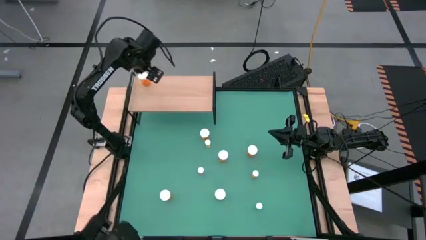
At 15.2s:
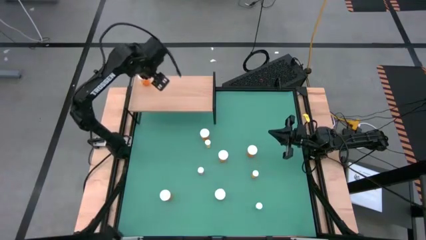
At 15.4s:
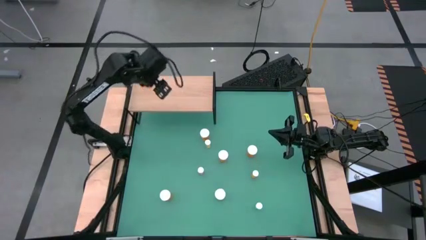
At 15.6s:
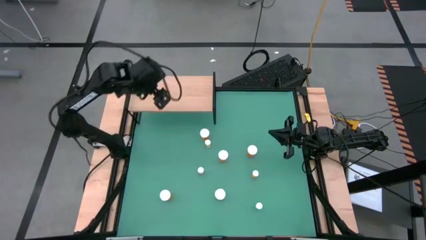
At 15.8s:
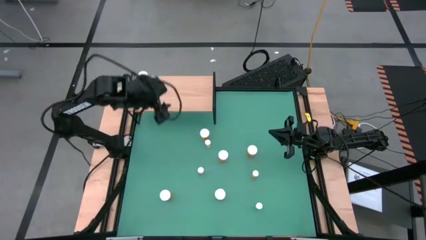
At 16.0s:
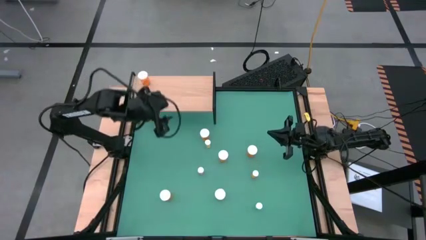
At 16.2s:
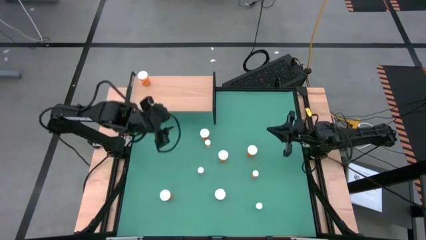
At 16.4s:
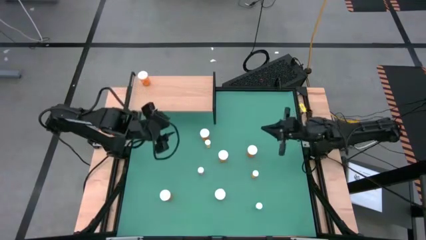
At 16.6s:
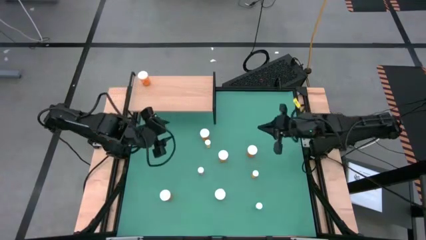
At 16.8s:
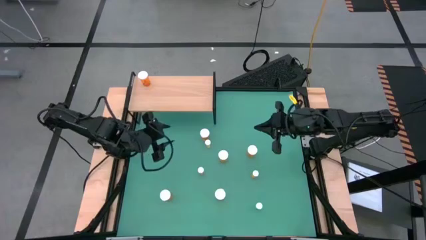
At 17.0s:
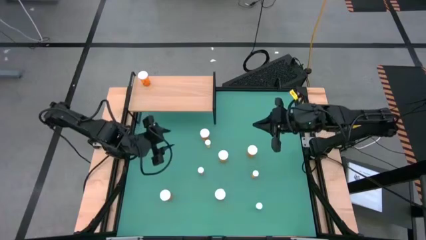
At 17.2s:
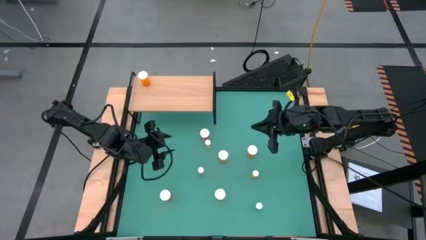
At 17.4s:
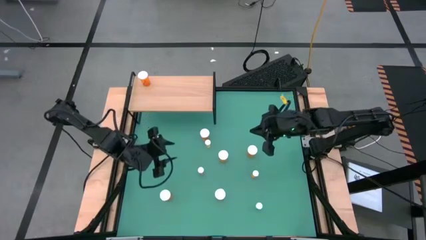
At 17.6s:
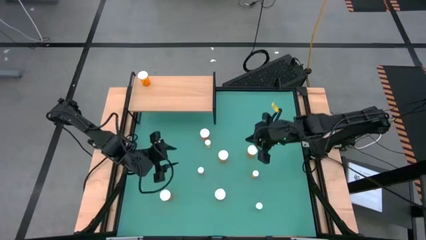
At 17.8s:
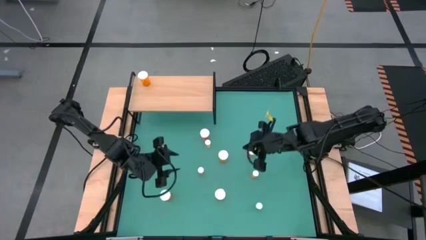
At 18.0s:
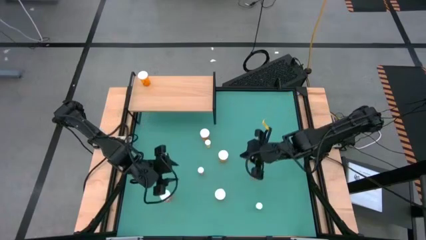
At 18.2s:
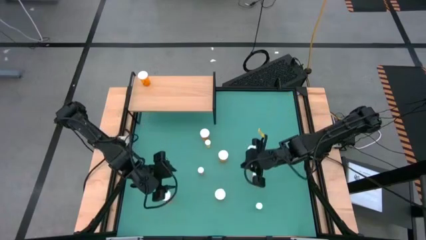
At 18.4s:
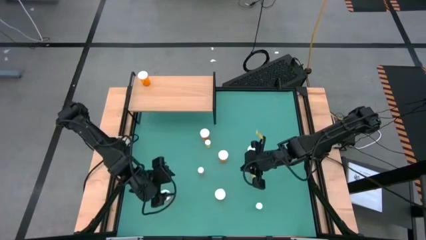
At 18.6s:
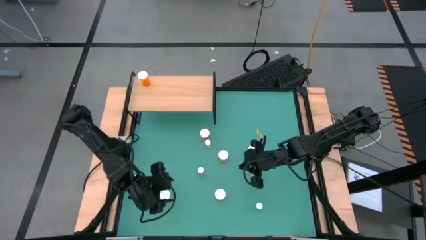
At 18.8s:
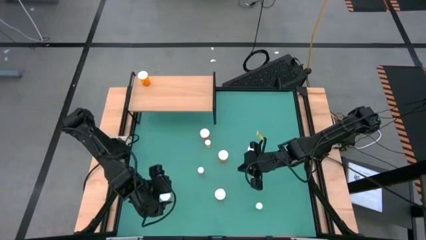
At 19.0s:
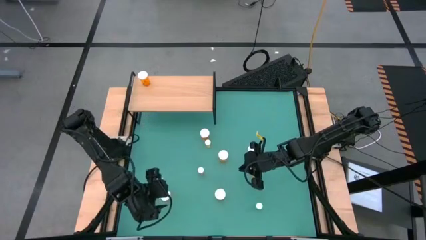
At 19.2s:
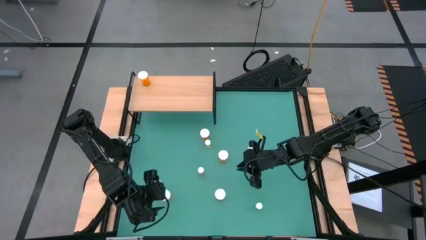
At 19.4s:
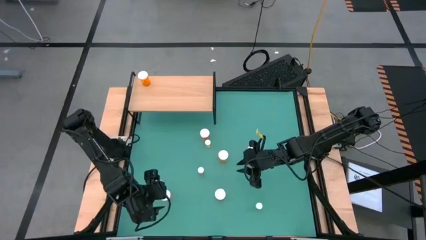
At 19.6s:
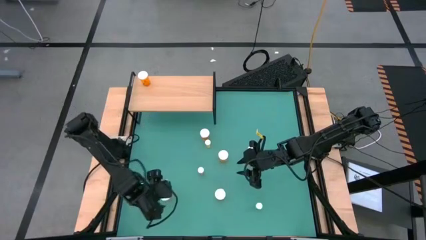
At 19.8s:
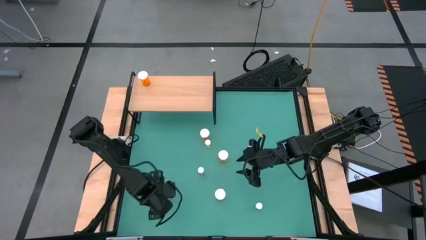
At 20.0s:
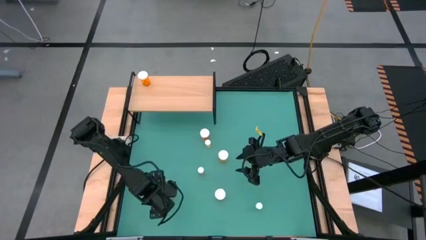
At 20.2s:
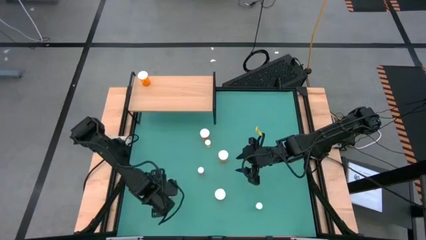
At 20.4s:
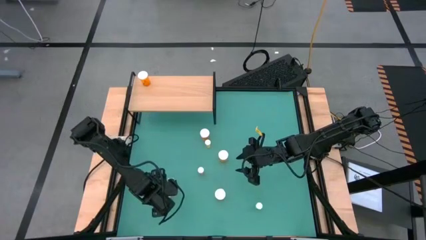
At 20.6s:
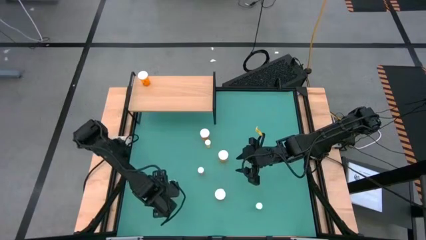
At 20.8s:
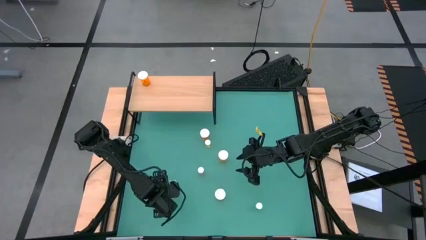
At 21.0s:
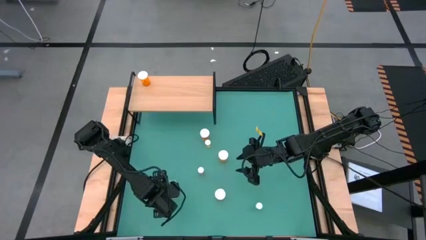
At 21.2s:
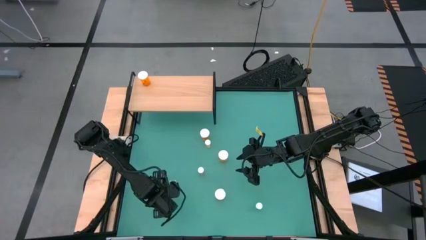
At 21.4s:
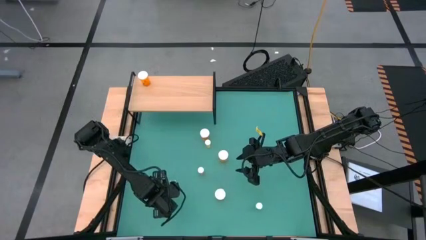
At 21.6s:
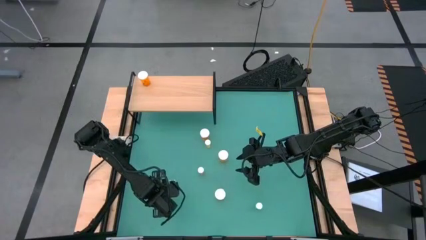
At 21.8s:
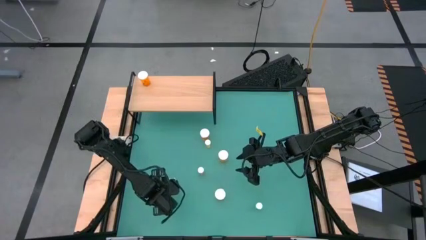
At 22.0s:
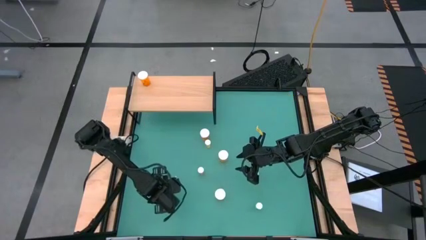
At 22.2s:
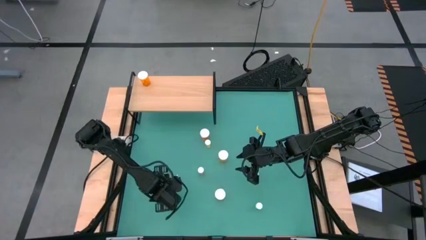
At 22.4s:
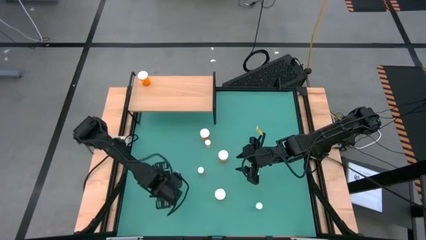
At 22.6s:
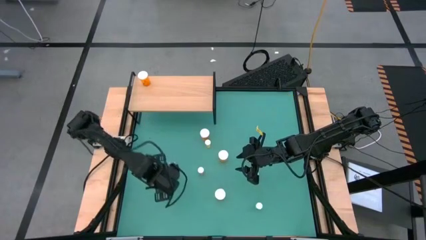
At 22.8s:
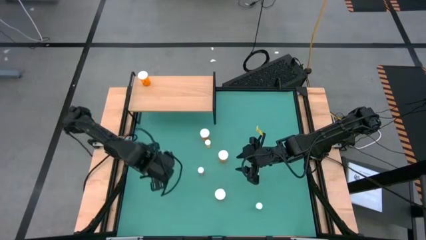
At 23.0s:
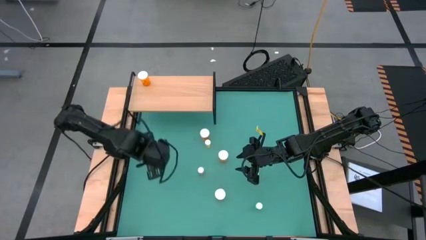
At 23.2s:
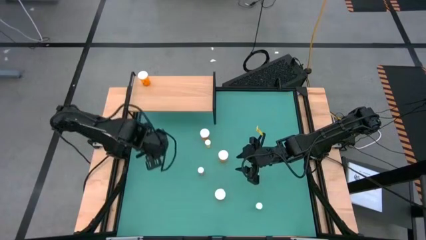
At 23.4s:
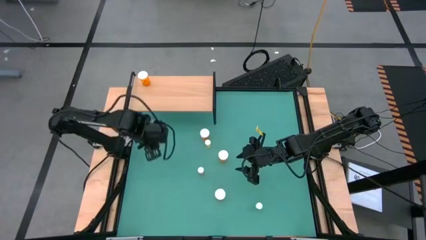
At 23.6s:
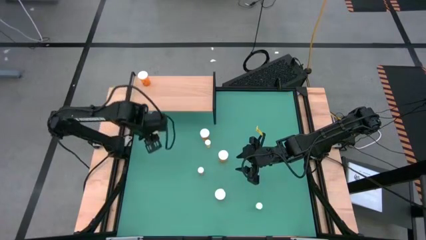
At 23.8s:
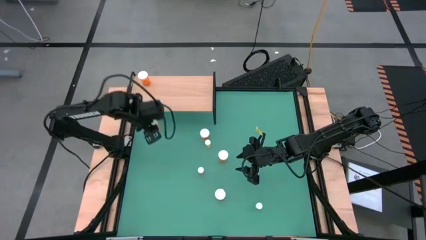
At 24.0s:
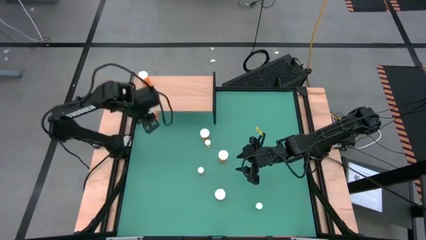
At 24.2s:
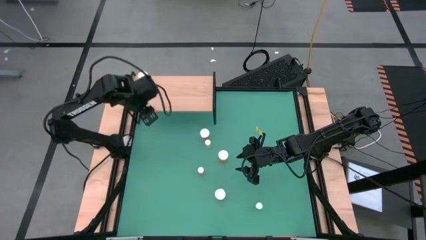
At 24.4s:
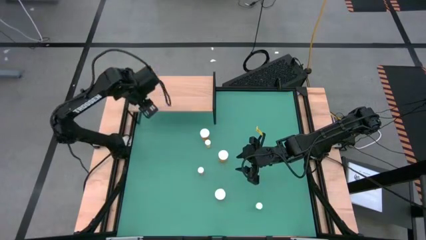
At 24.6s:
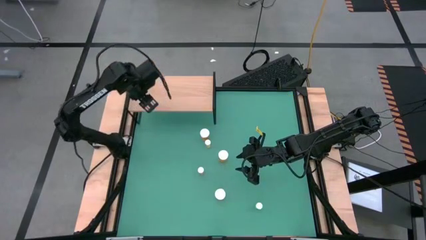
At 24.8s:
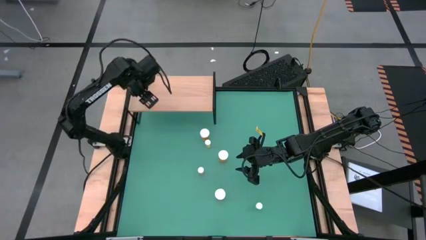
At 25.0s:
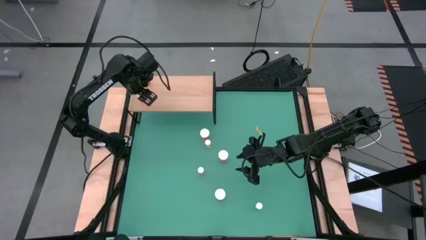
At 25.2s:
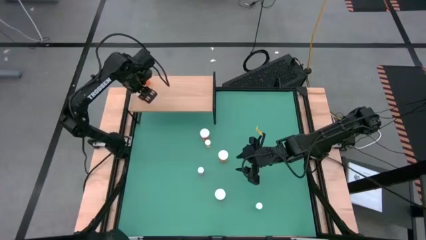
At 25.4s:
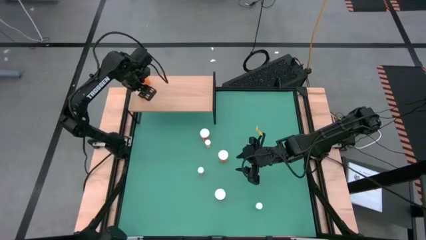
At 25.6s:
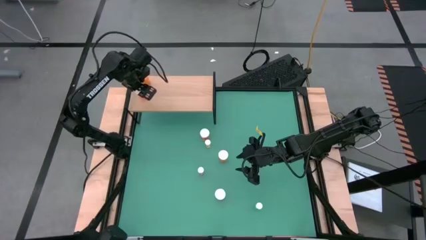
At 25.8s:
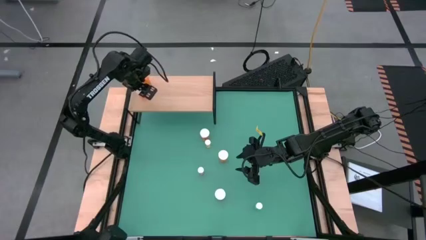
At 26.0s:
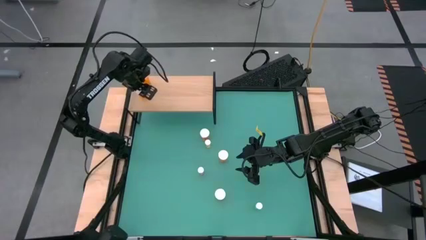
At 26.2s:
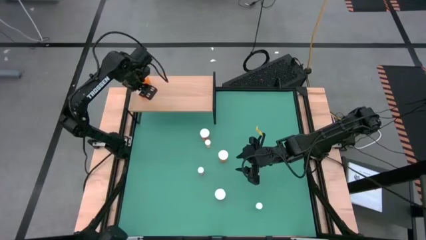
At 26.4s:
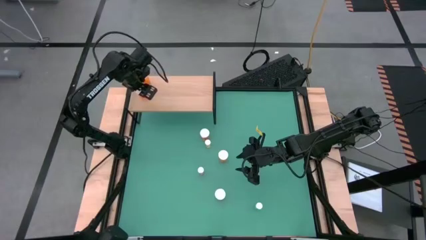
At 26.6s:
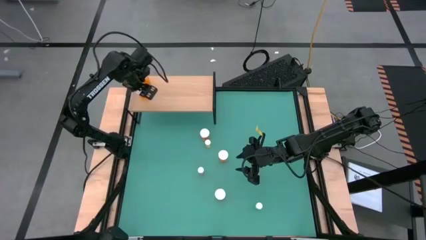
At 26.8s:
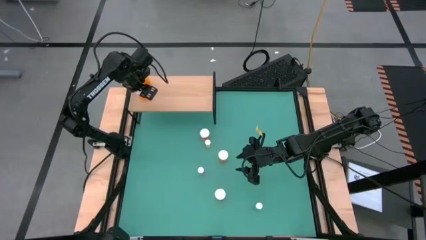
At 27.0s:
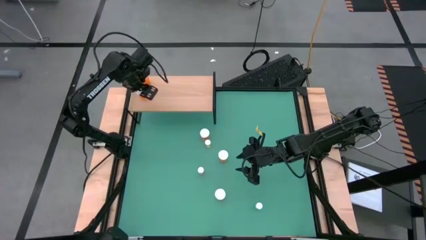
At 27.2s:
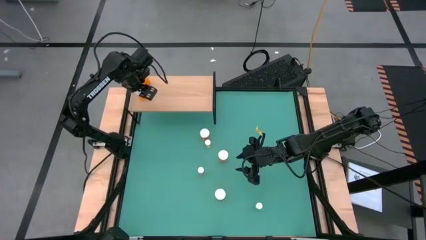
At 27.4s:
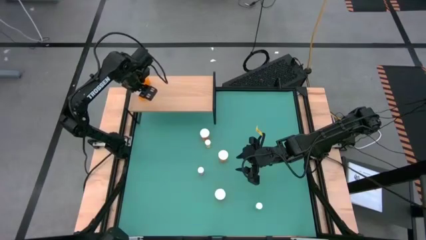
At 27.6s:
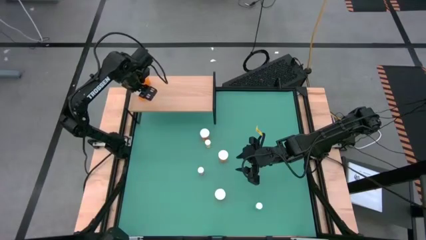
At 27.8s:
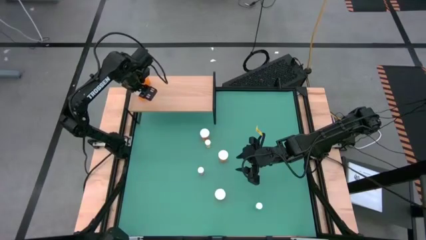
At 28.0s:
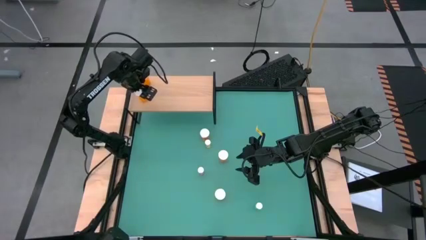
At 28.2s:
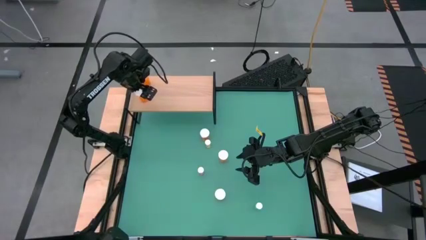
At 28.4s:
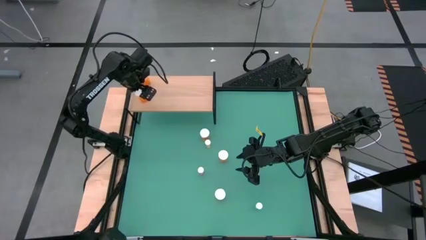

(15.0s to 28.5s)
Task: Pick and place medicine bottles onto shelf by color
Put the big orange pill bottle on the shelf aligned with the other big orange pill bottle
